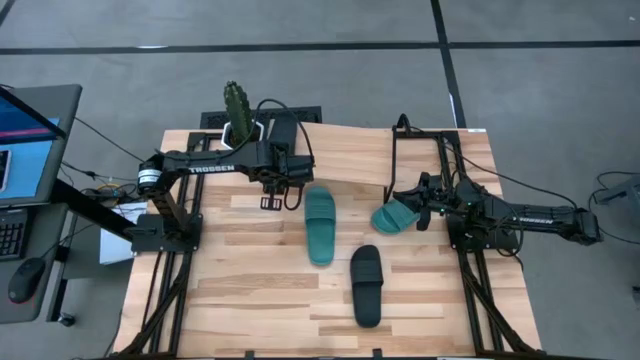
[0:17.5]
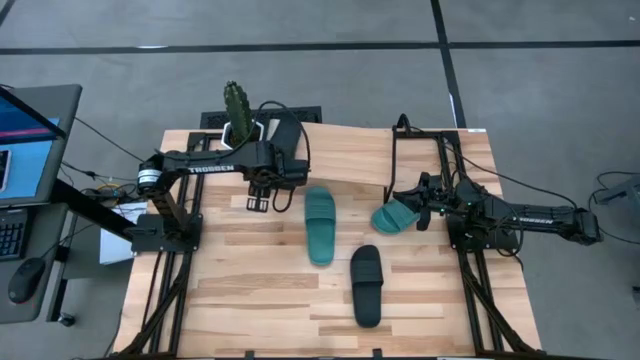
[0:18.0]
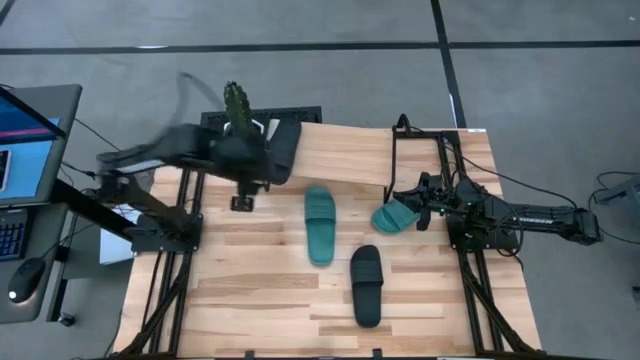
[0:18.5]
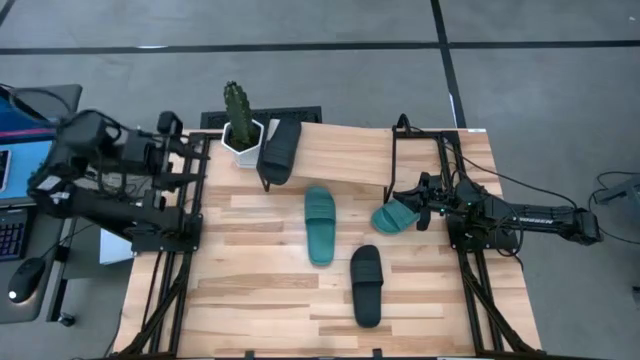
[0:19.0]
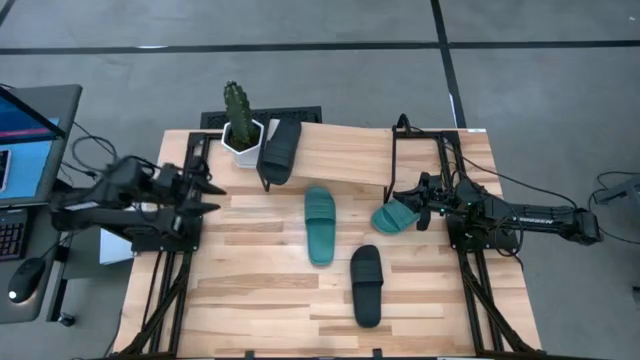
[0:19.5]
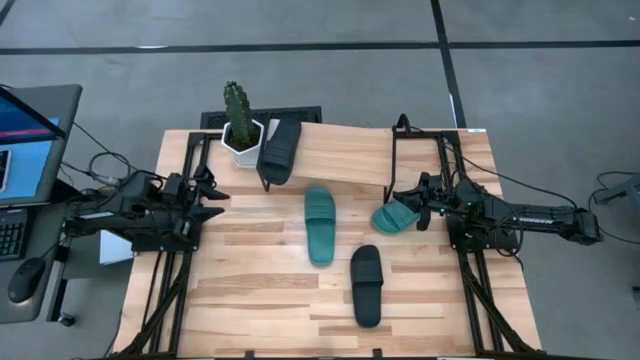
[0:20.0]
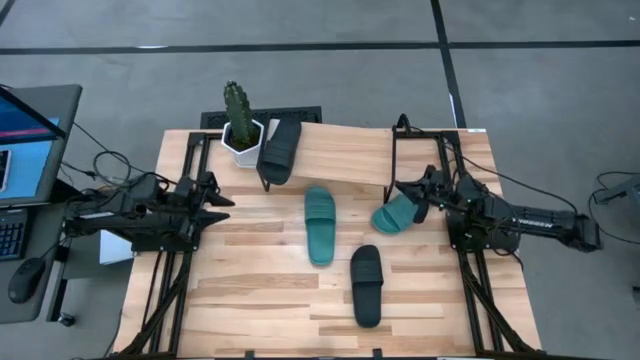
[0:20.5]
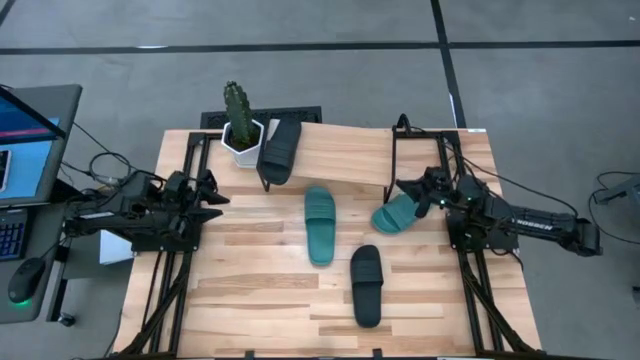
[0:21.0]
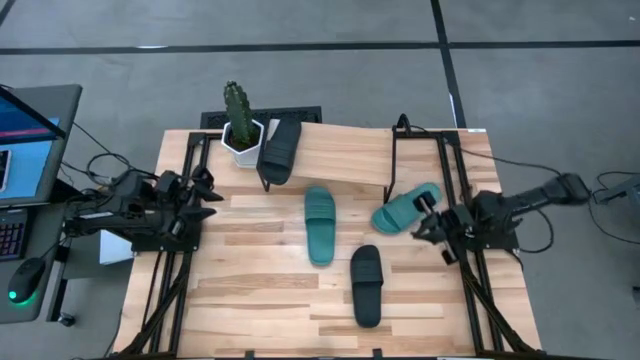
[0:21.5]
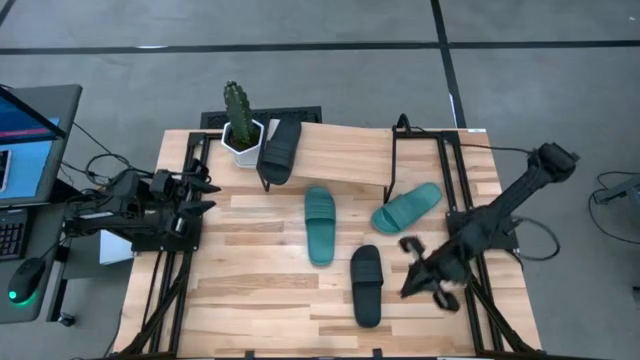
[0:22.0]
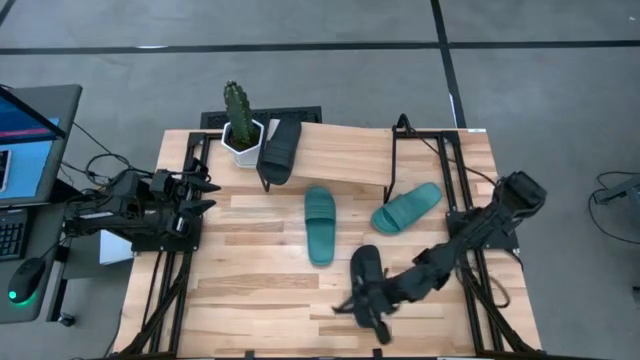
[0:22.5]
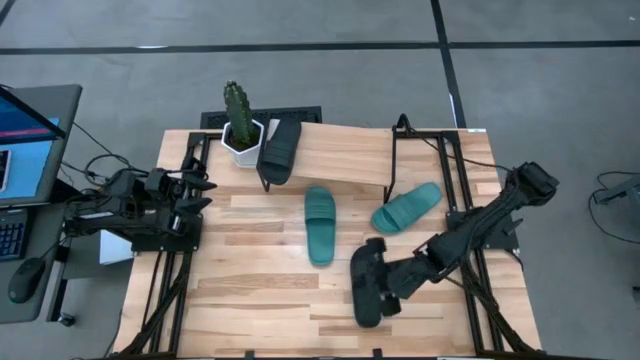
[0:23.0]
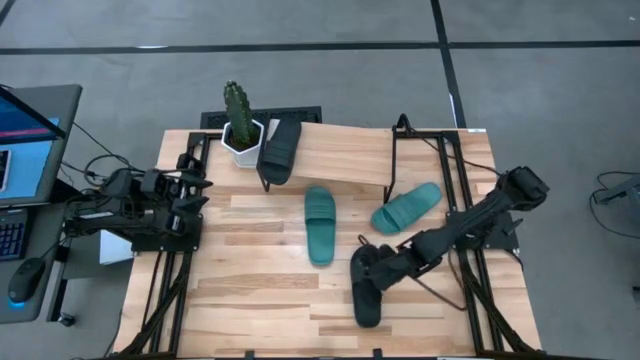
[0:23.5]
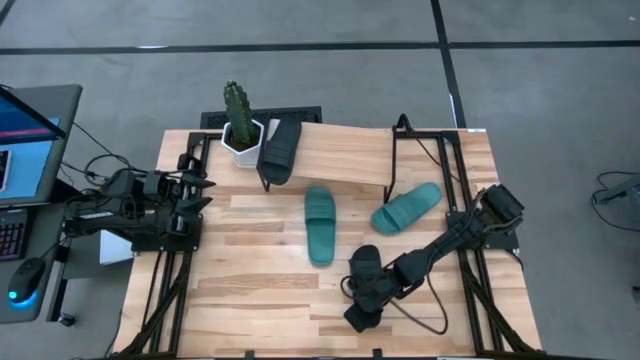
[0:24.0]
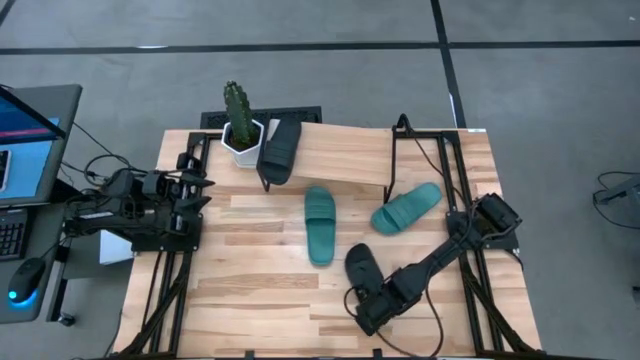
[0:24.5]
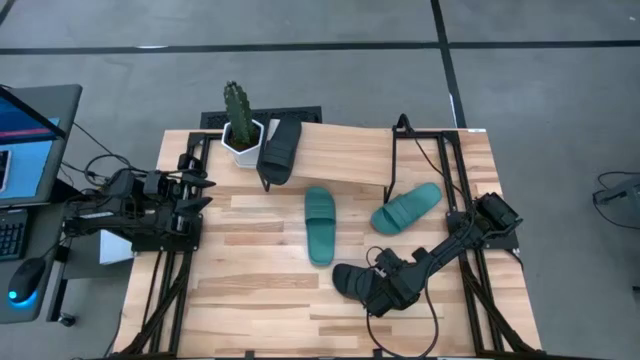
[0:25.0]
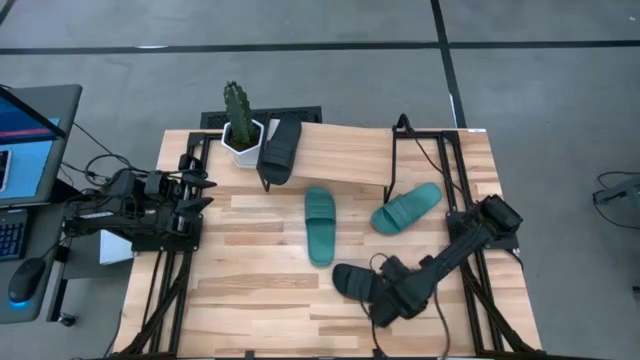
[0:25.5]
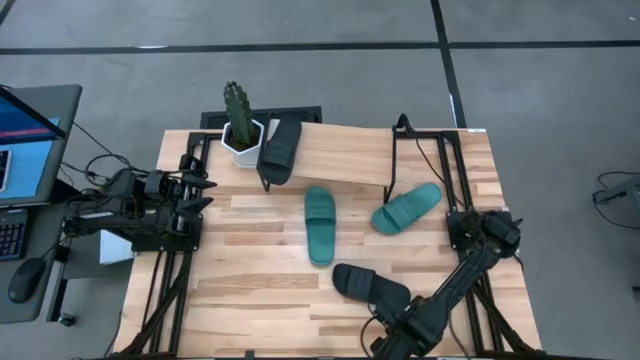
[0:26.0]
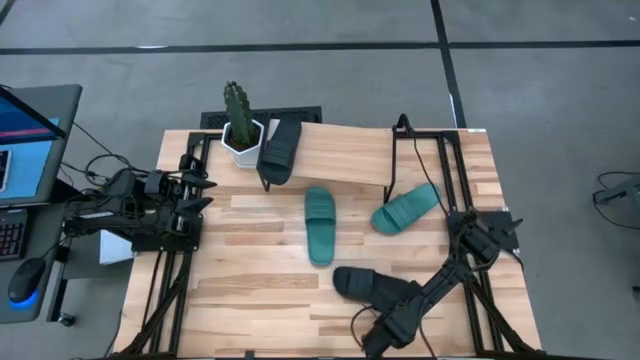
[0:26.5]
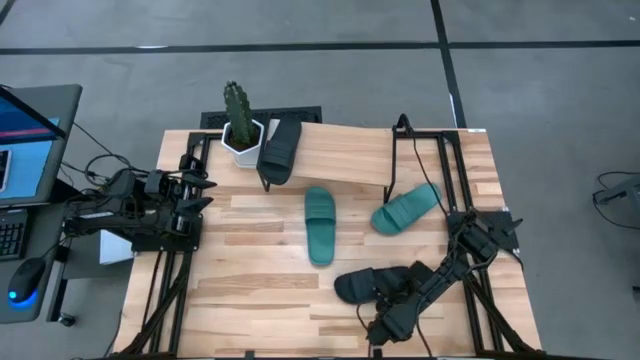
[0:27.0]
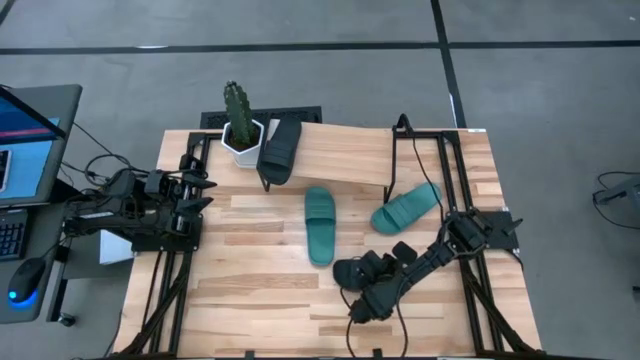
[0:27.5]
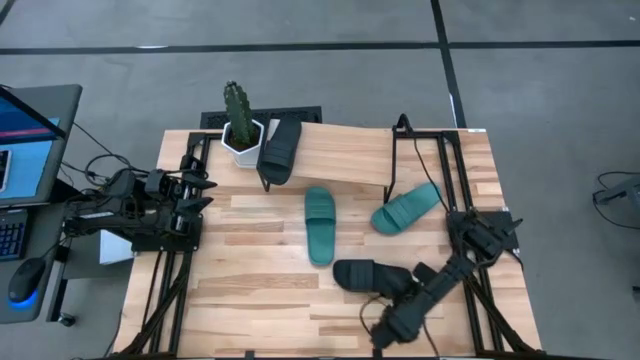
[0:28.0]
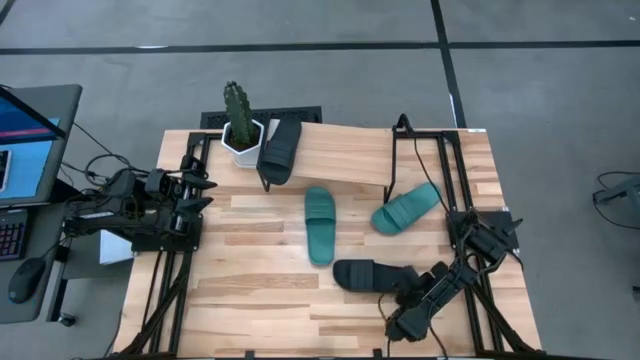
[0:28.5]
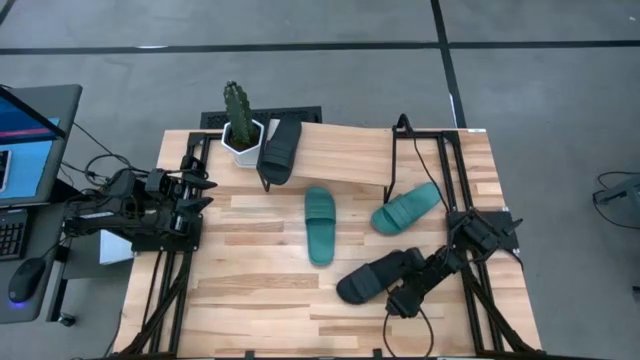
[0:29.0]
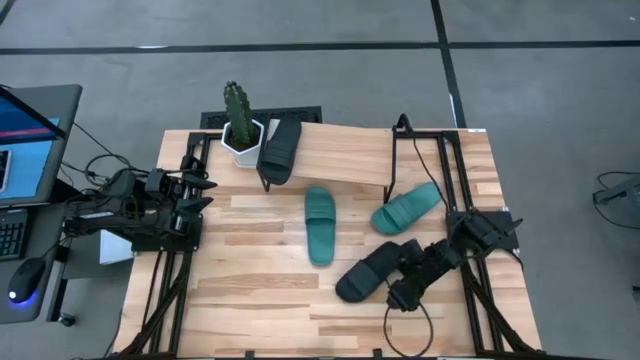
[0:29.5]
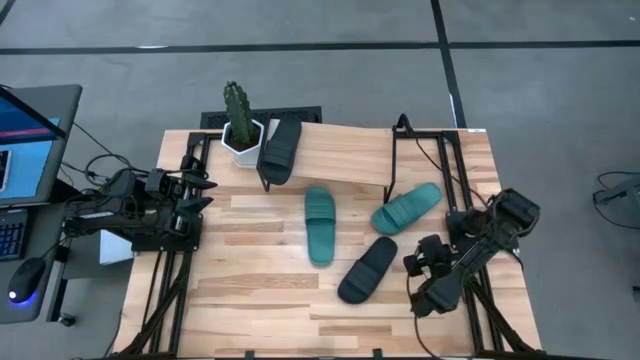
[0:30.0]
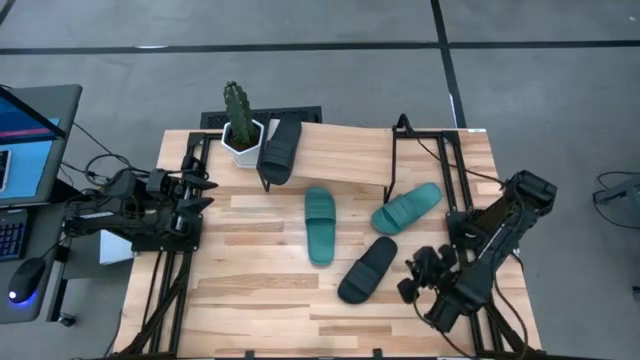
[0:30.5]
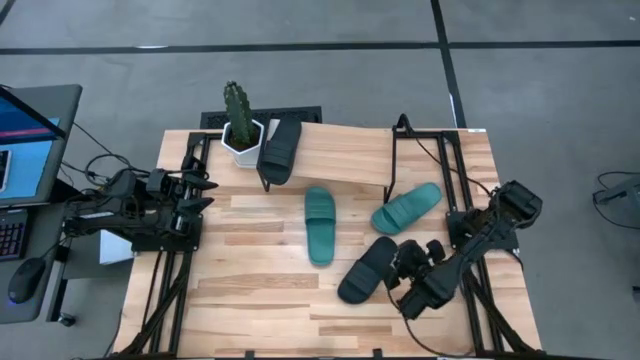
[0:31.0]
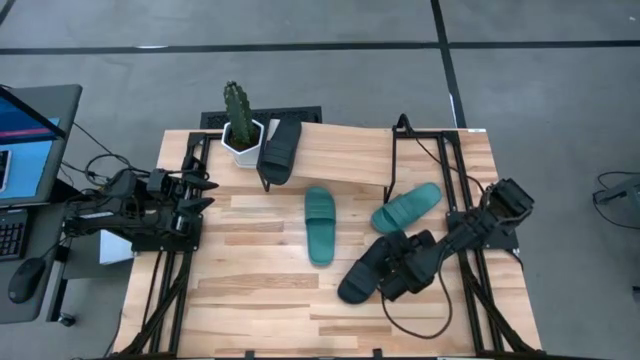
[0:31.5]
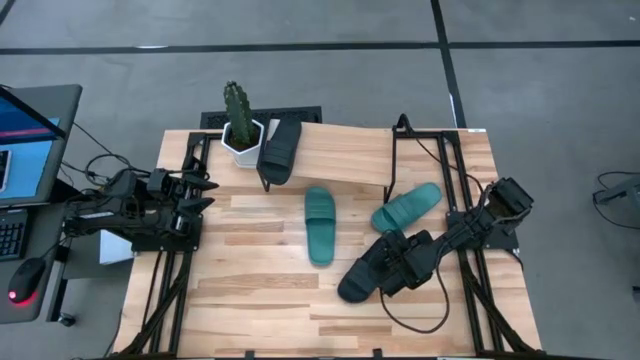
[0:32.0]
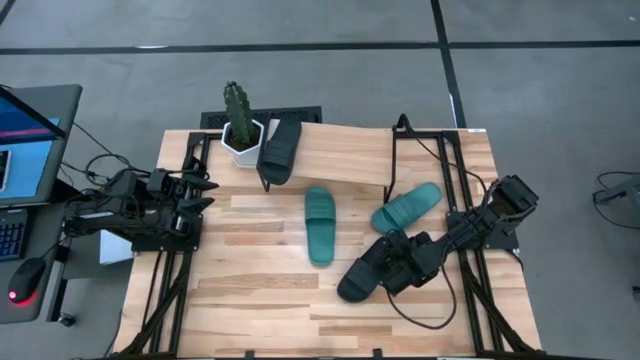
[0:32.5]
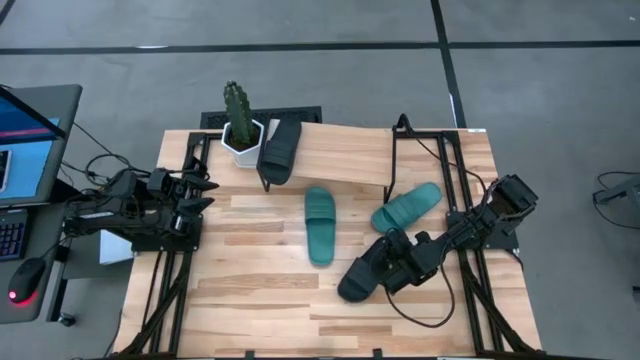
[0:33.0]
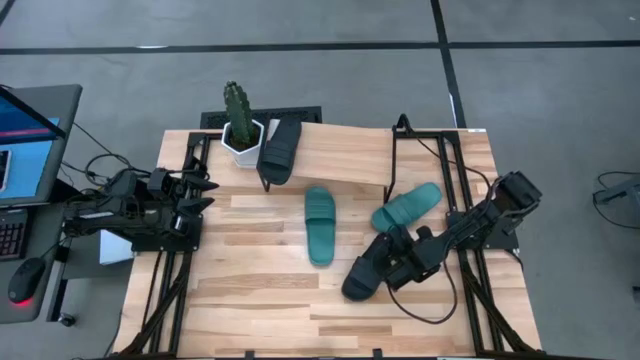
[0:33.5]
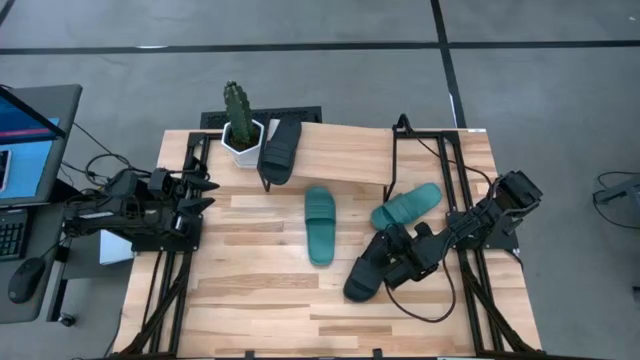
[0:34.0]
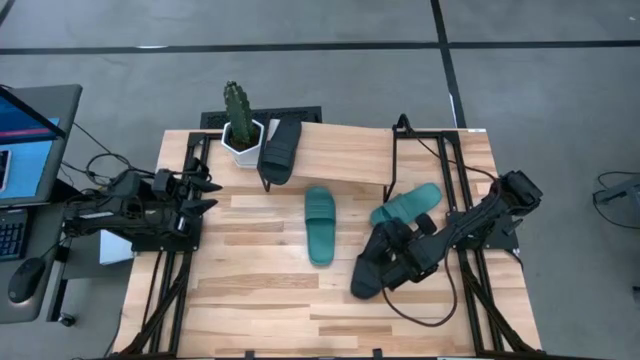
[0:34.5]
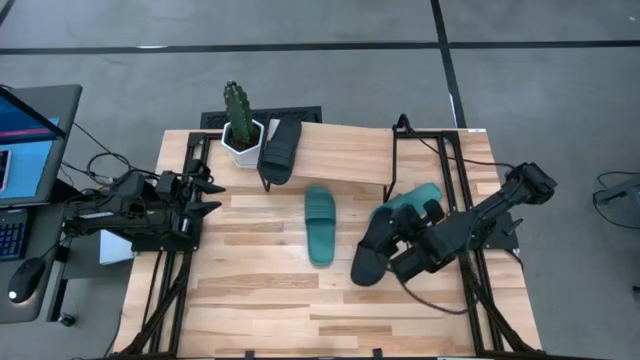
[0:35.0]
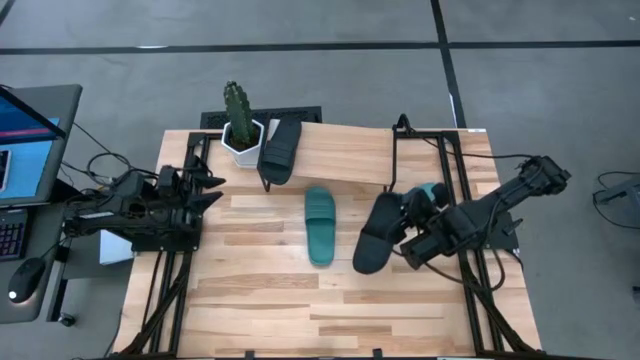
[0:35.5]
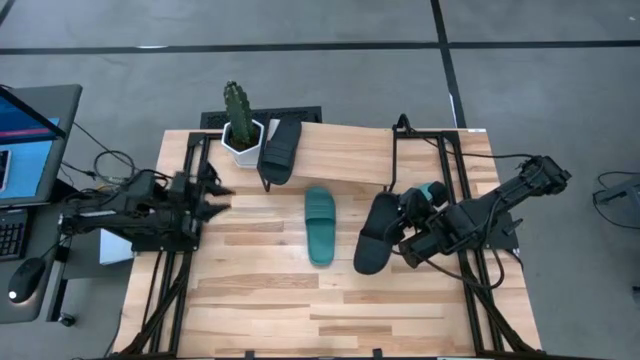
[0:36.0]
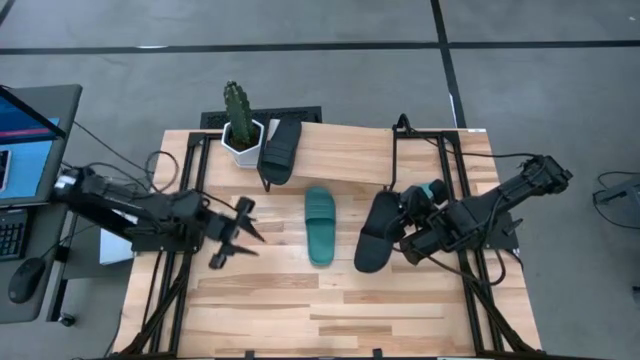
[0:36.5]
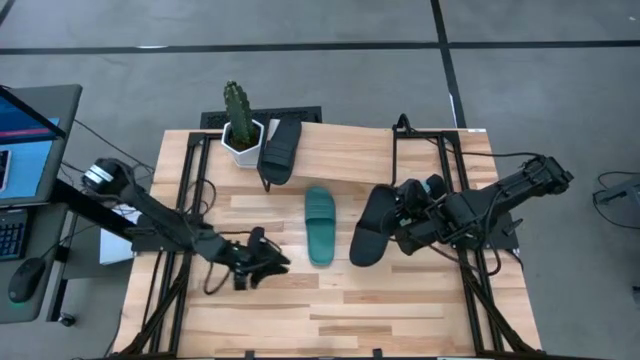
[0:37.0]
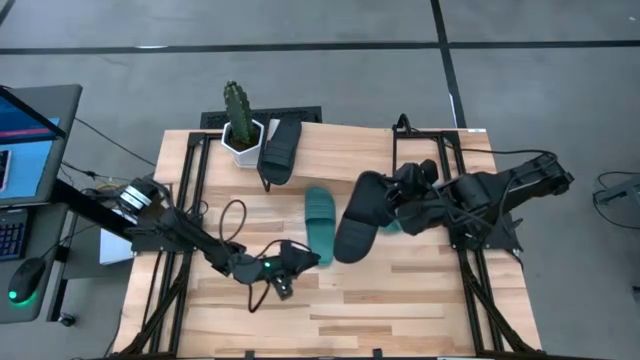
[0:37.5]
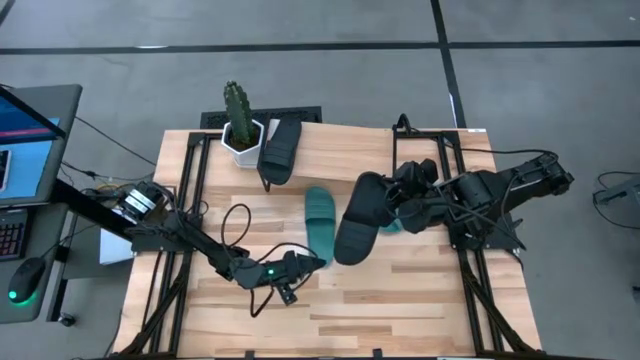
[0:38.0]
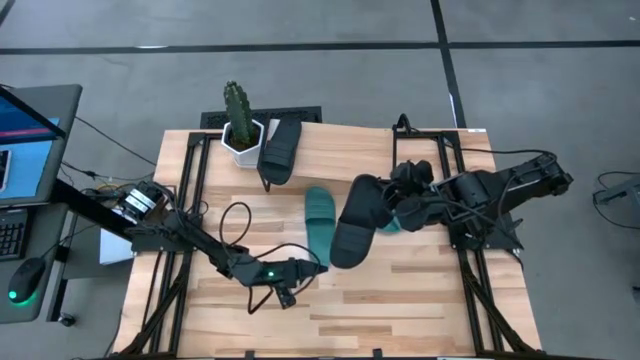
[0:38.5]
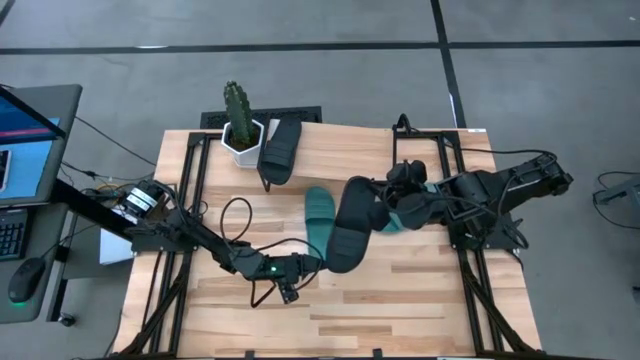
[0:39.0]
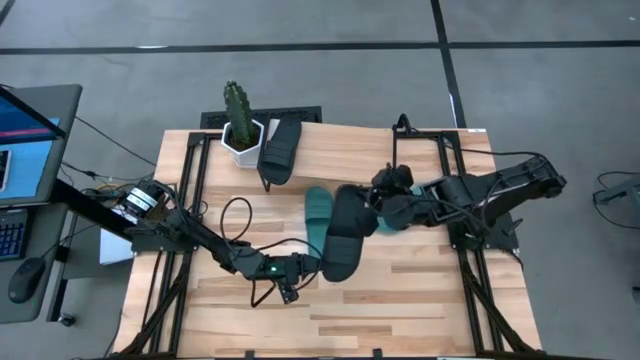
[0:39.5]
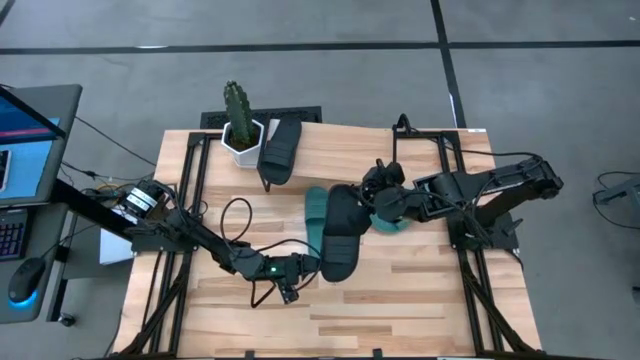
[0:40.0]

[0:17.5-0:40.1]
Task: Pick and place slides into the shelf
Put the black slides on the shelf
